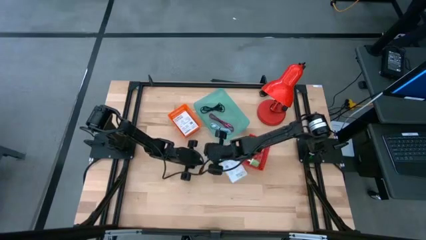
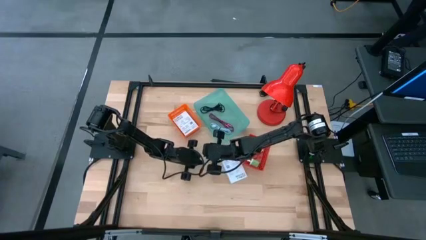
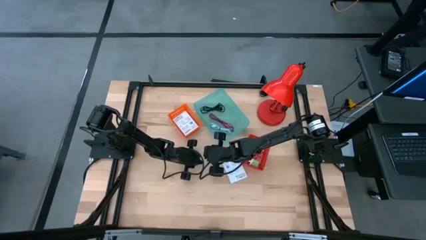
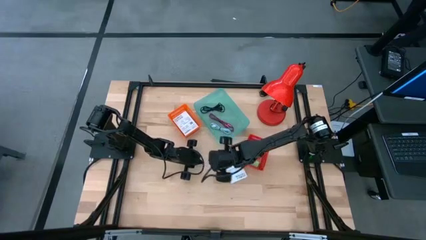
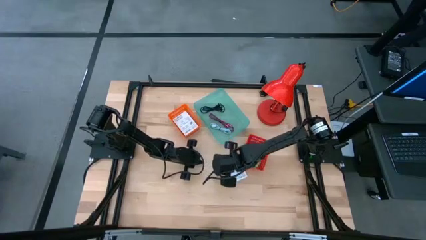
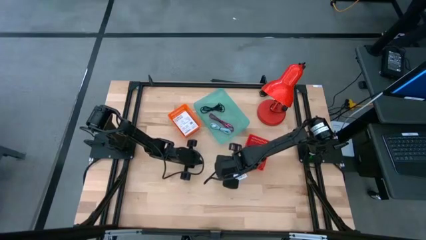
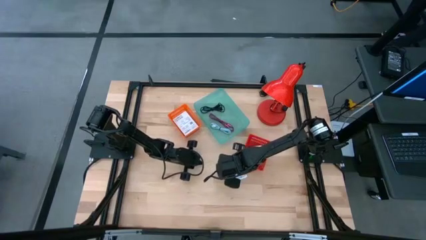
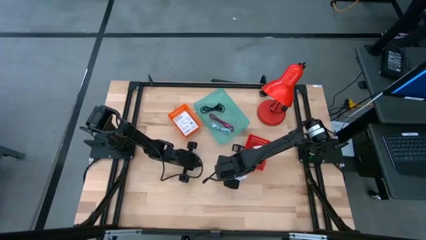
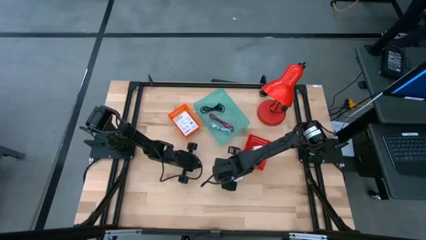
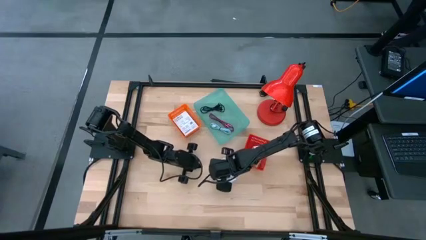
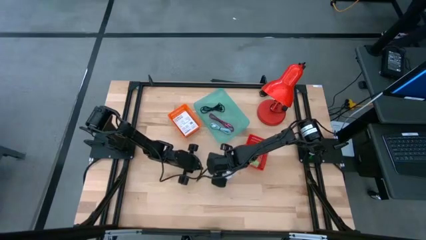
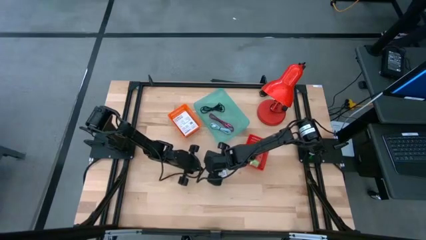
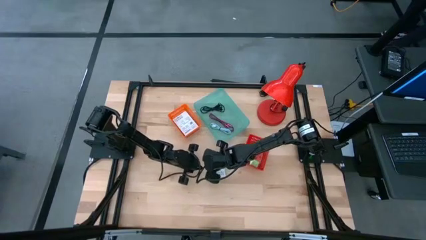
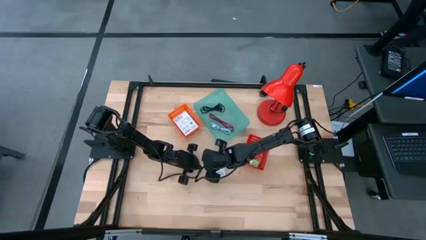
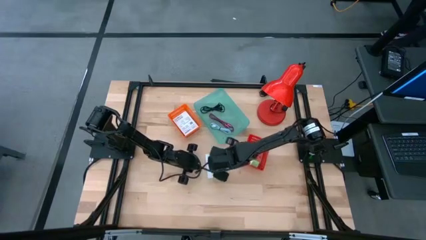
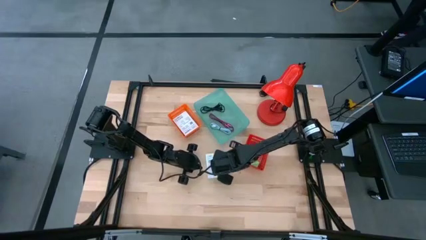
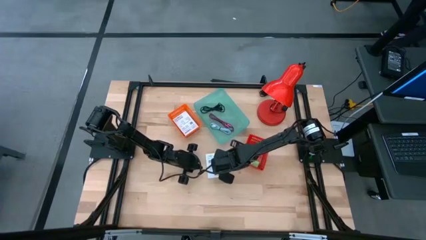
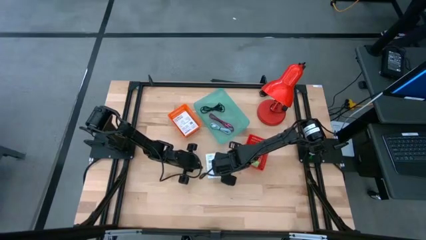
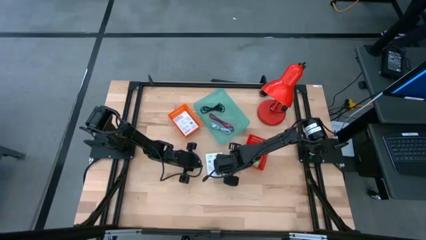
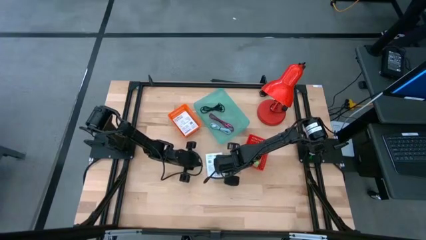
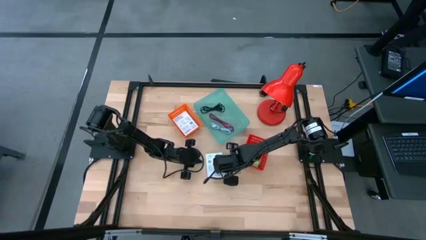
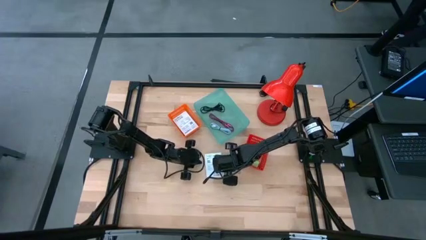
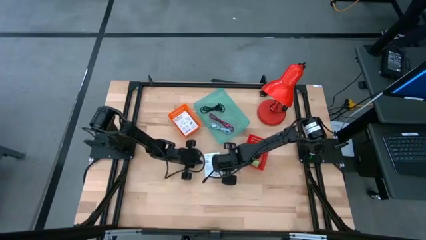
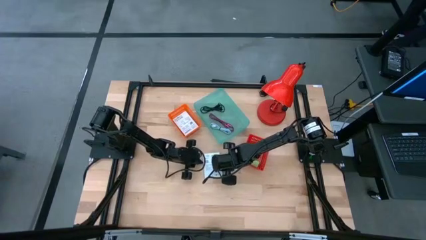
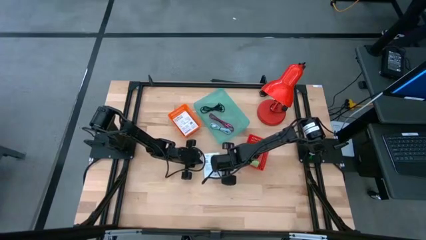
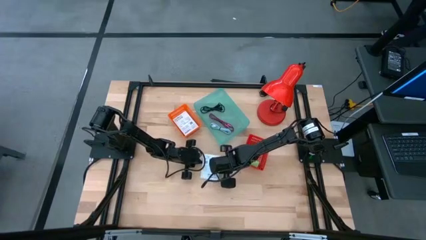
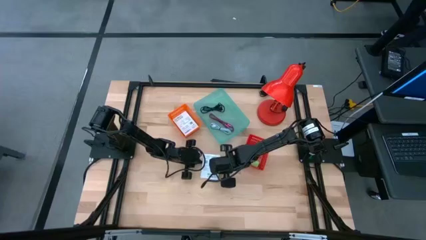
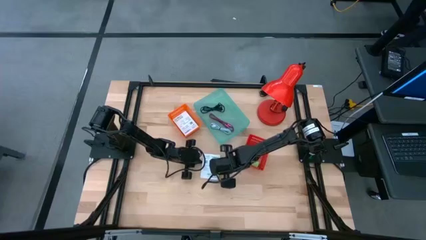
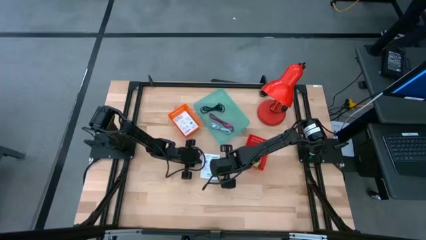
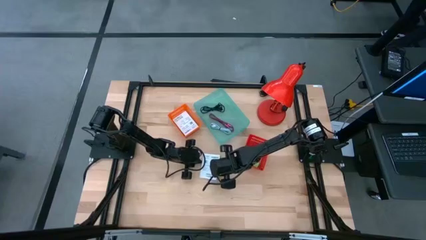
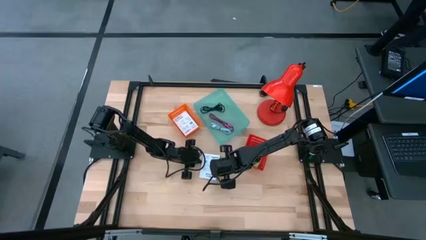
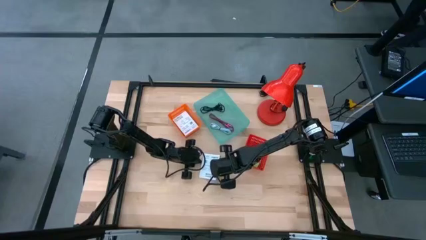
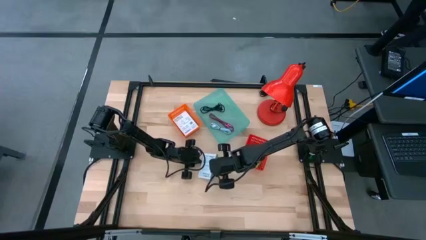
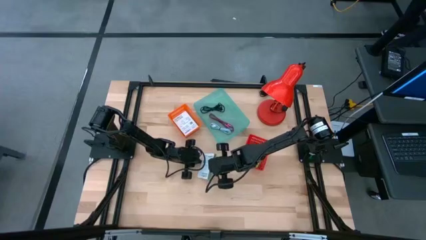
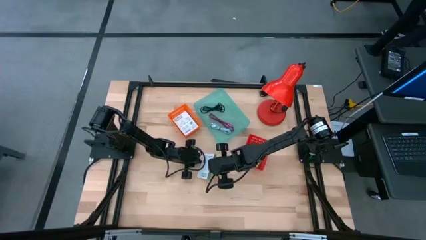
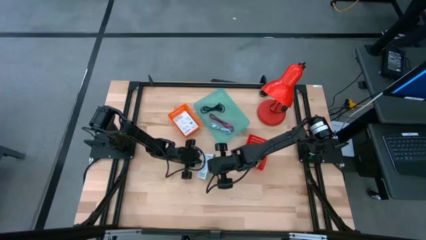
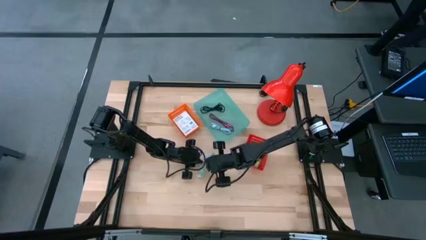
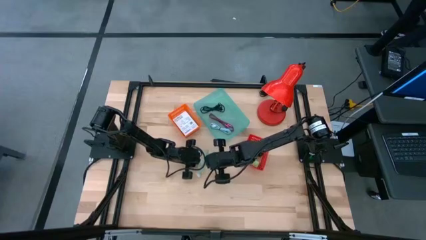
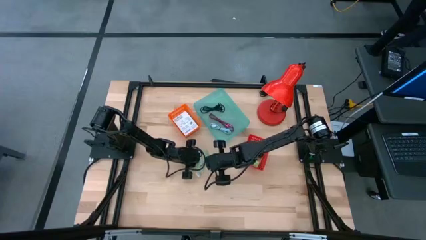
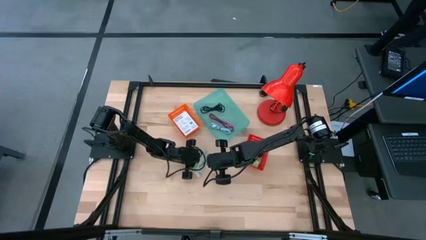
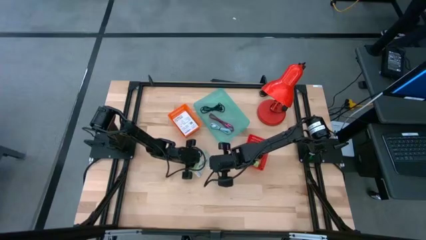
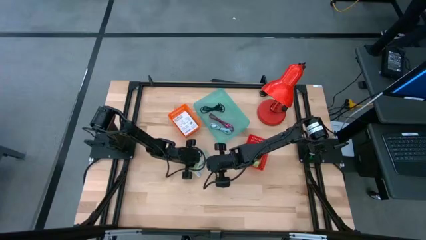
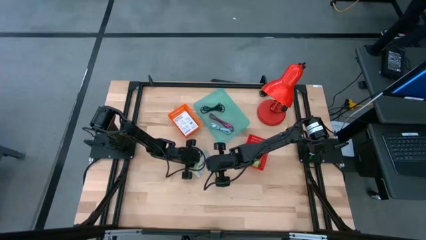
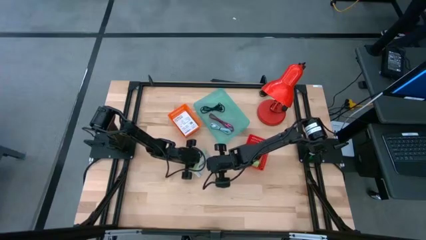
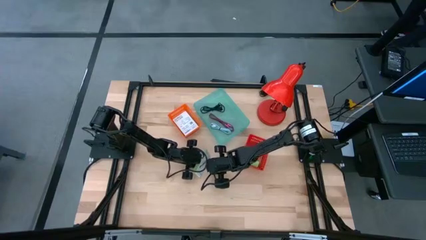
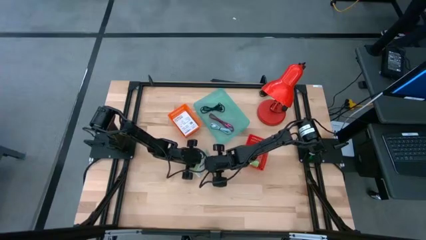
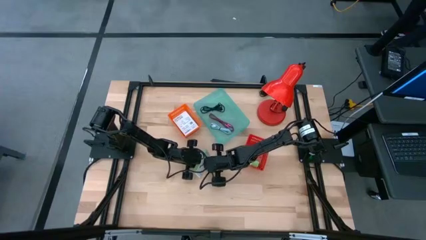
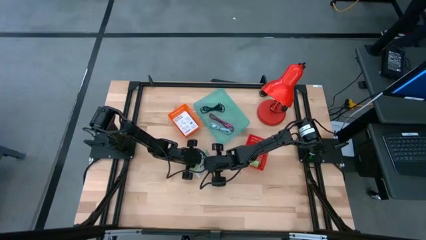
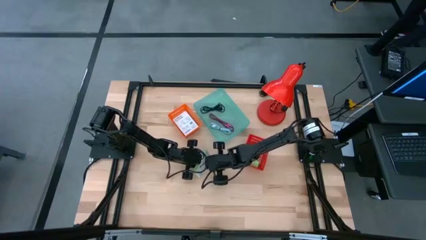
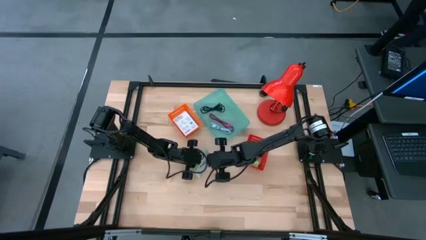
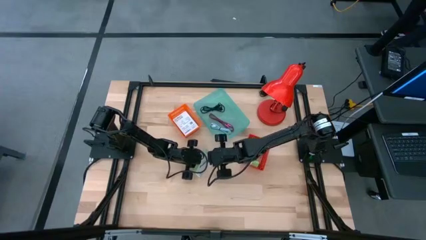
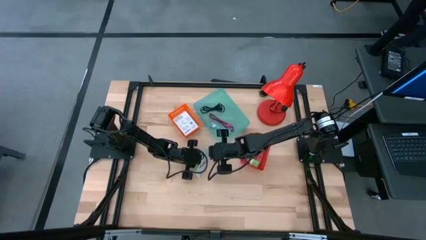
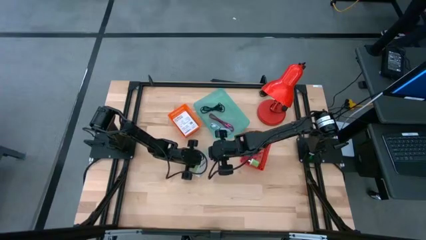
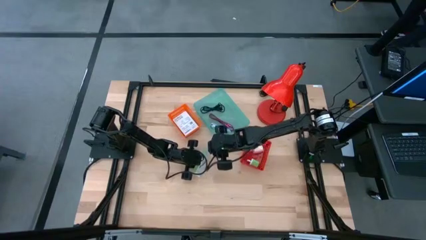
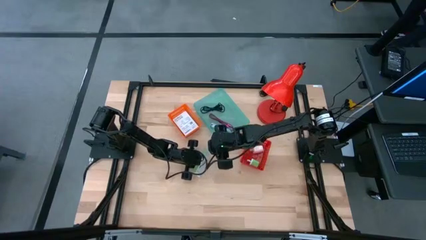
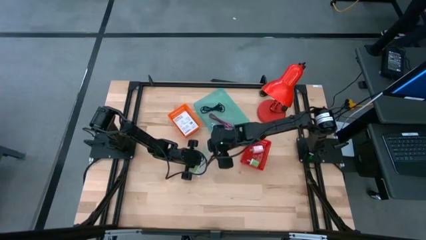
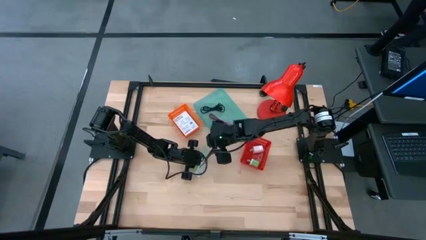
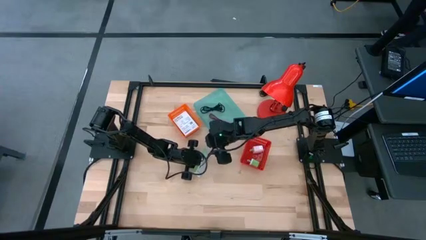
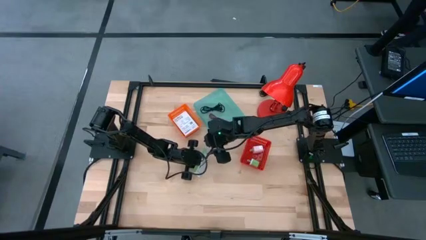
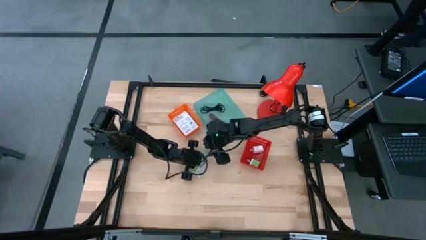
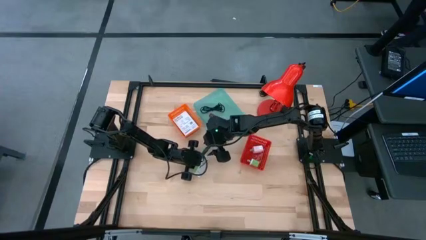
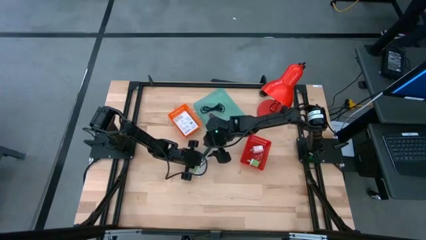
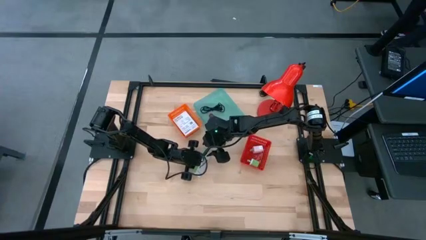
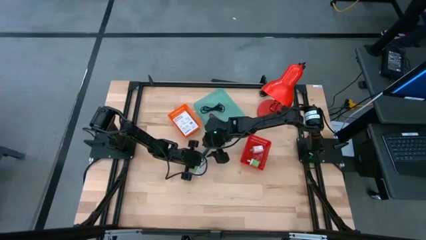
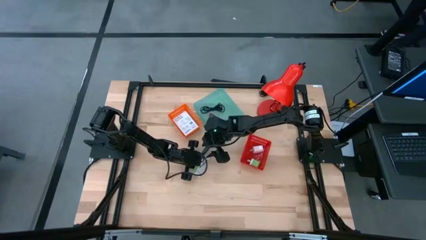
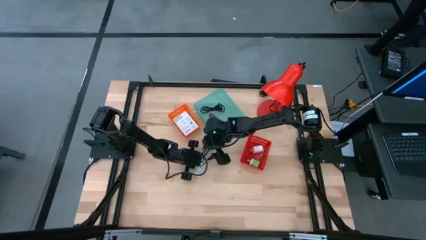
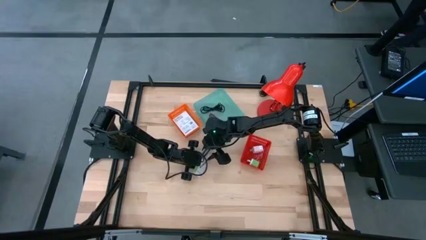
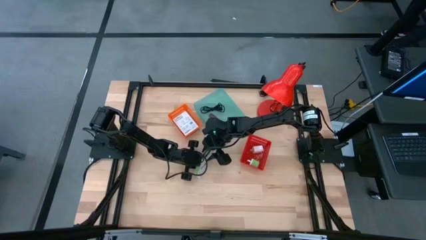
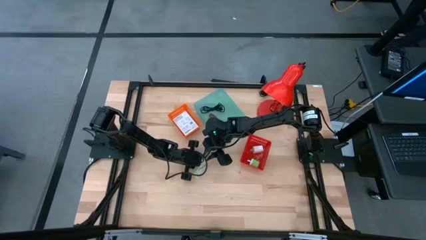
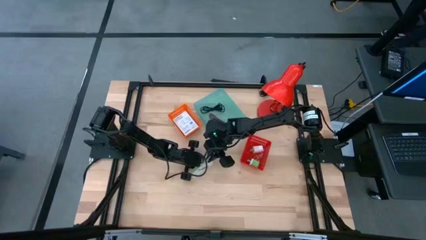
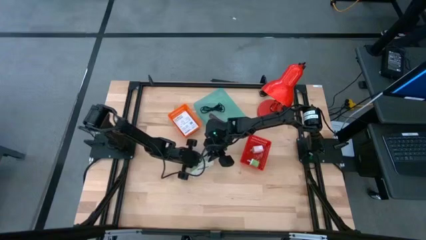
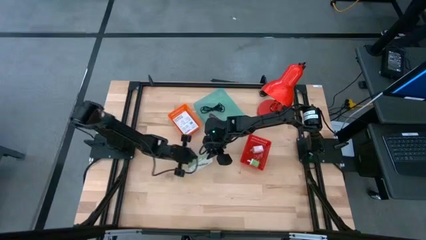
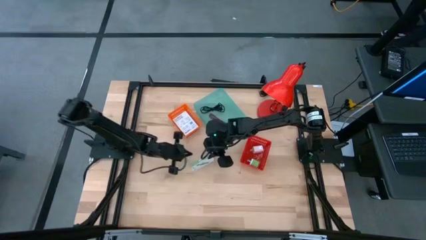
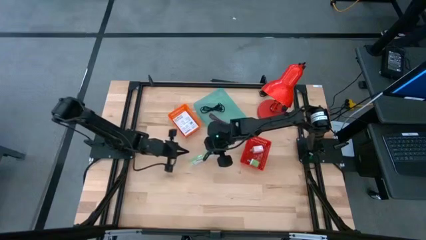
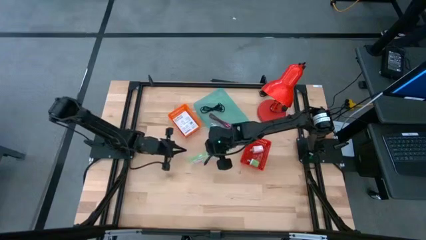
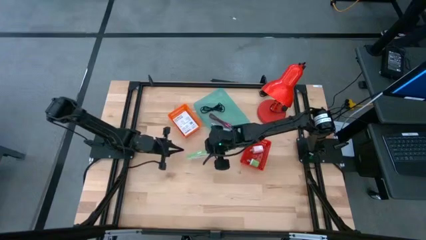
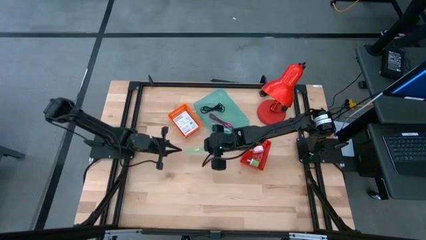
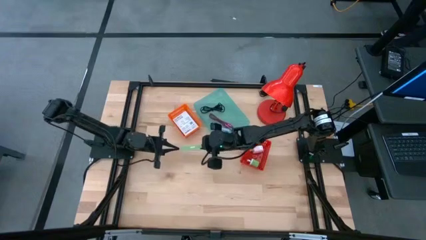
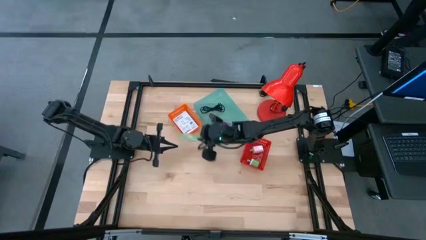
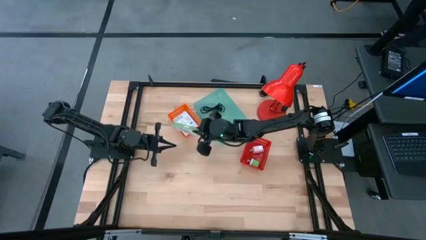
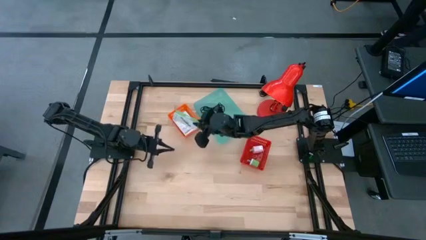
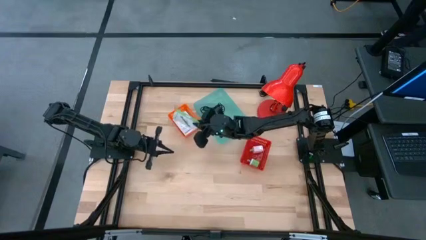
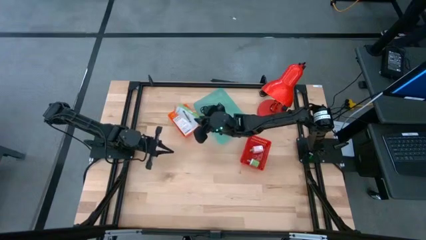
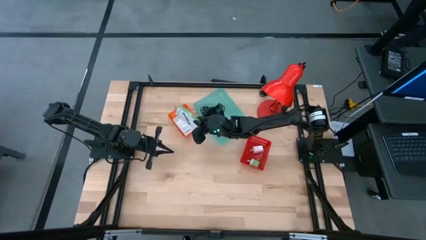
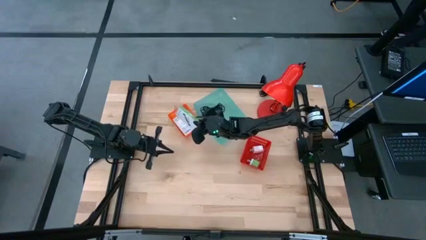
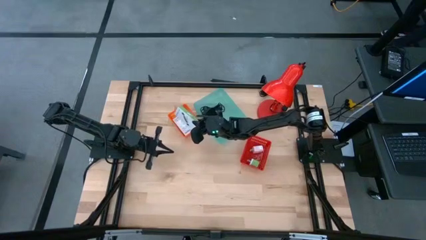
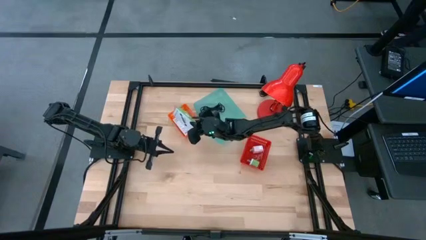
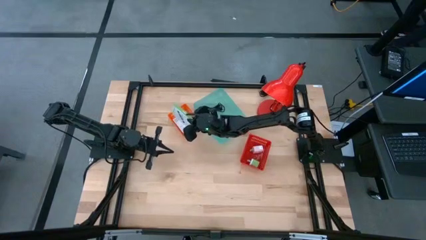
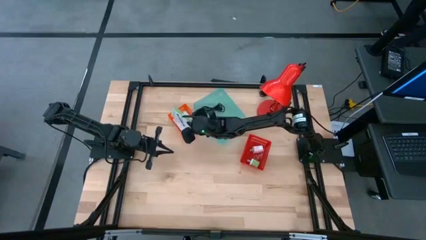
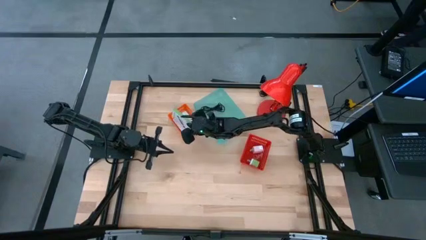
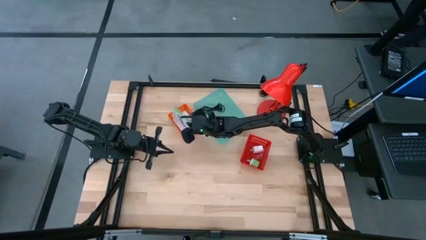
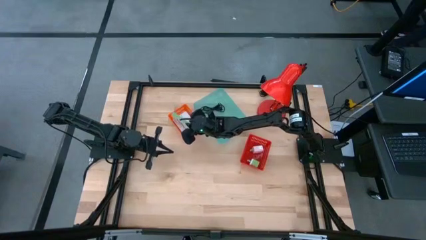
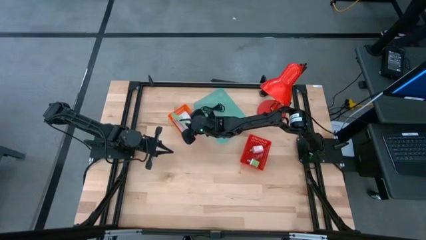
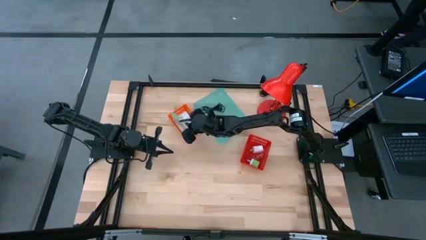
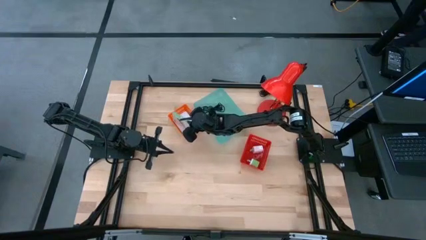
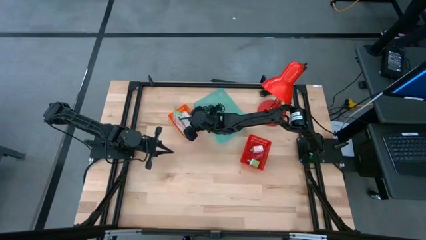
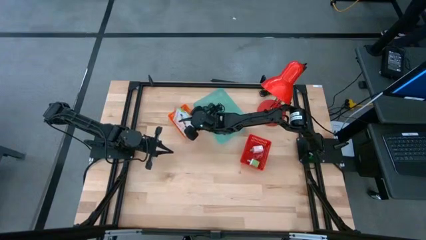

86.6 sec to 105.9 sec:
Task: Pick and place items into bin
Put the white card reader box into the orange bin
